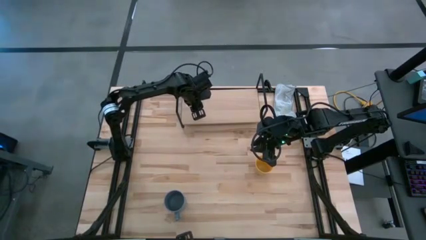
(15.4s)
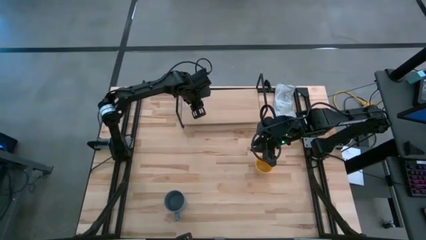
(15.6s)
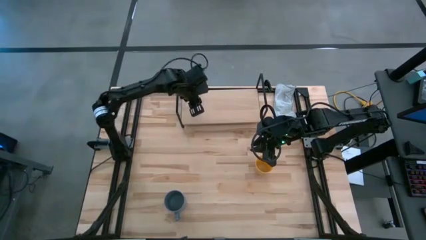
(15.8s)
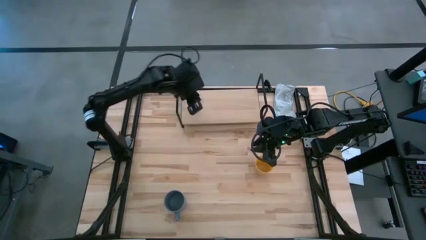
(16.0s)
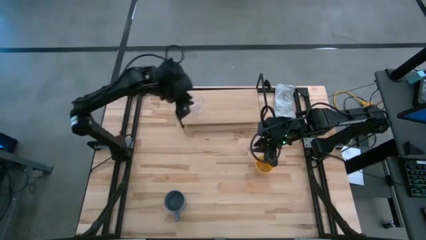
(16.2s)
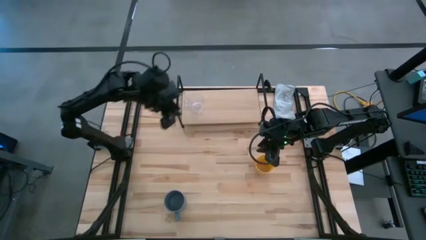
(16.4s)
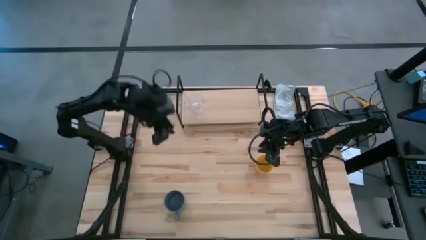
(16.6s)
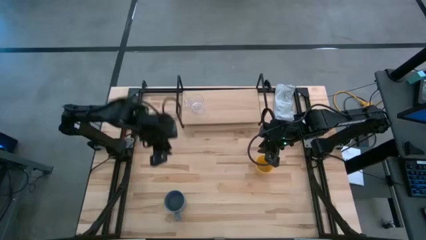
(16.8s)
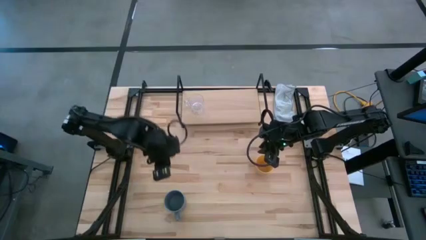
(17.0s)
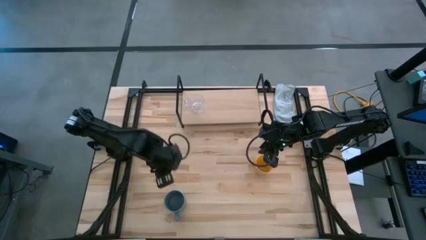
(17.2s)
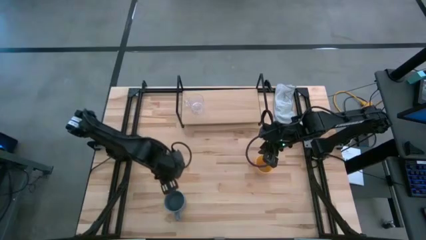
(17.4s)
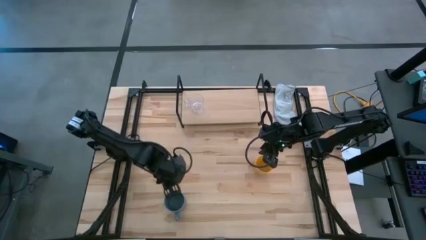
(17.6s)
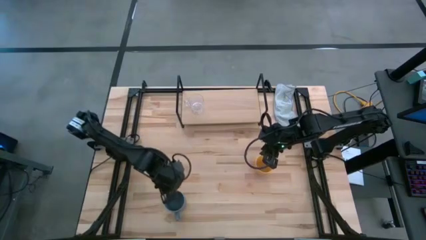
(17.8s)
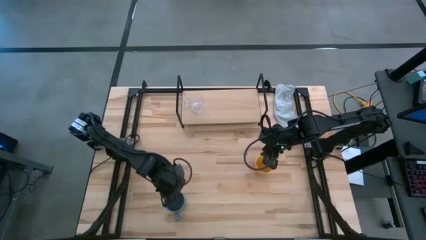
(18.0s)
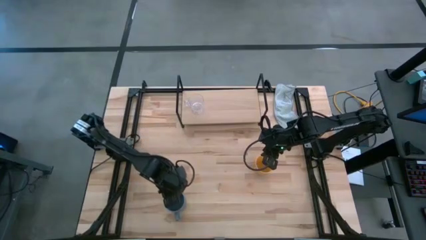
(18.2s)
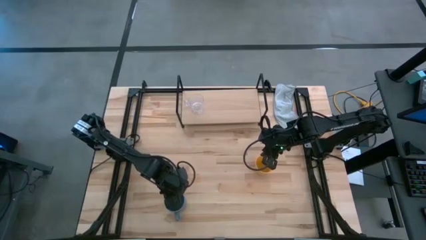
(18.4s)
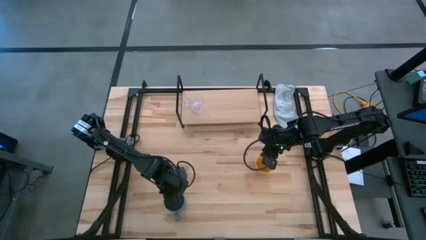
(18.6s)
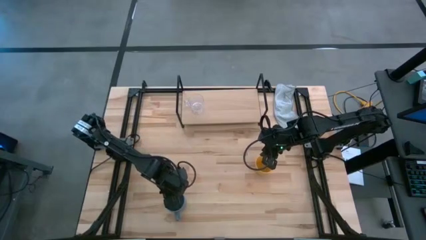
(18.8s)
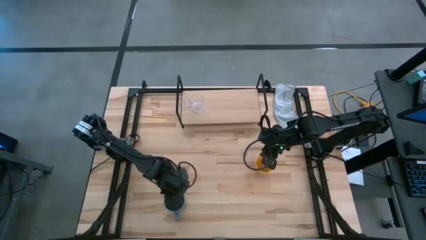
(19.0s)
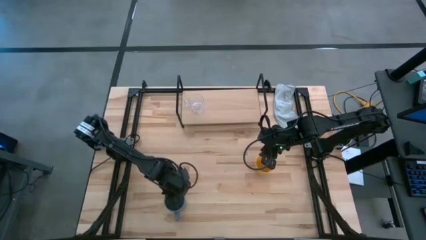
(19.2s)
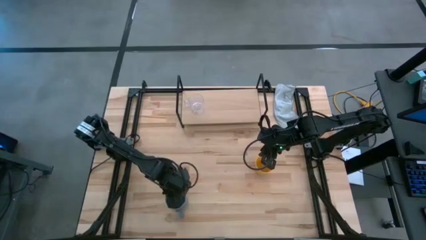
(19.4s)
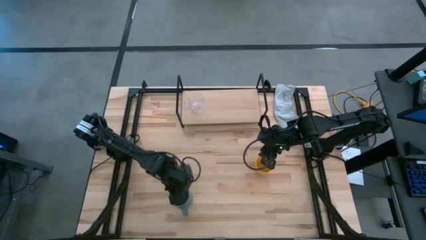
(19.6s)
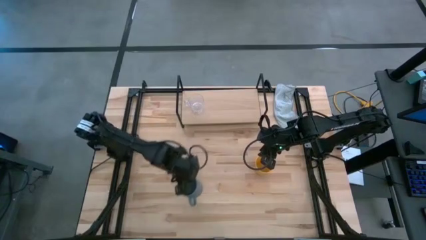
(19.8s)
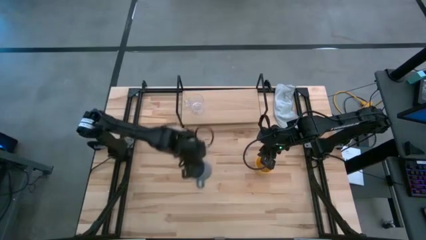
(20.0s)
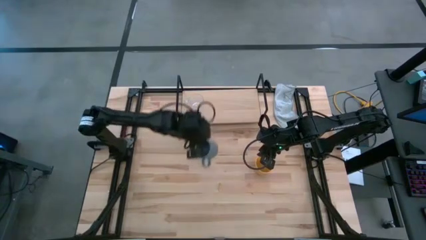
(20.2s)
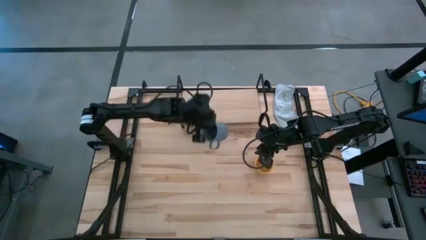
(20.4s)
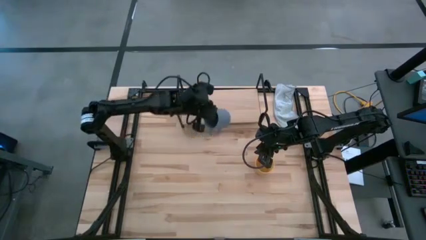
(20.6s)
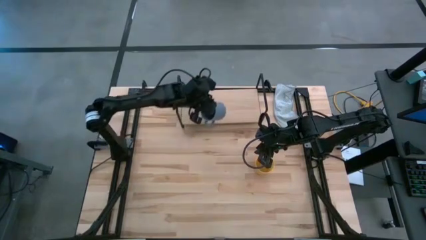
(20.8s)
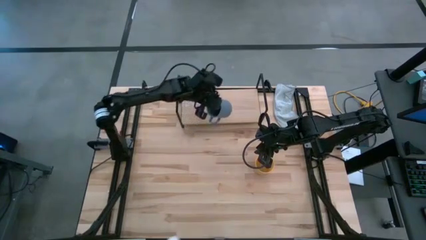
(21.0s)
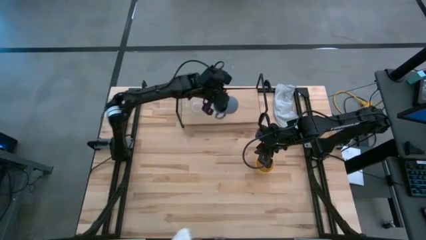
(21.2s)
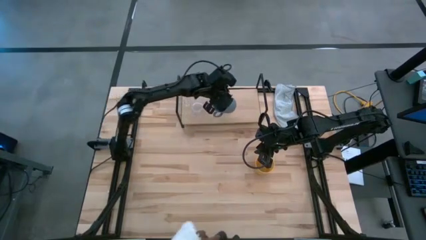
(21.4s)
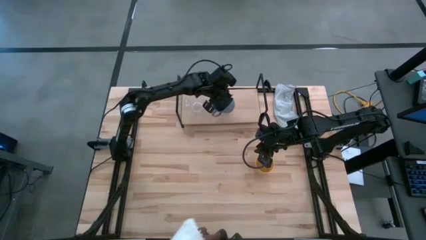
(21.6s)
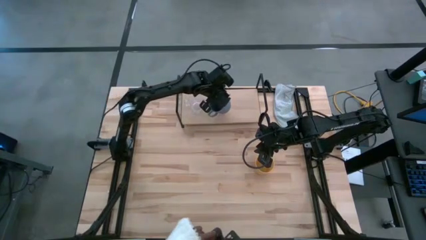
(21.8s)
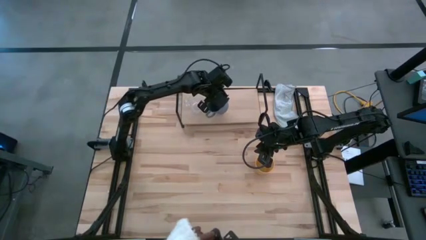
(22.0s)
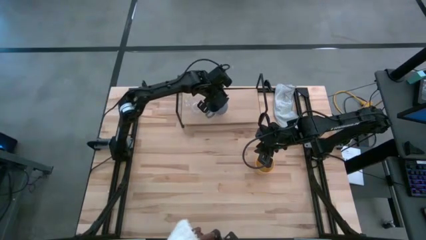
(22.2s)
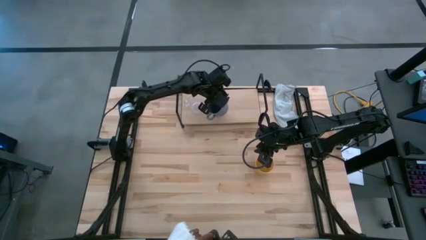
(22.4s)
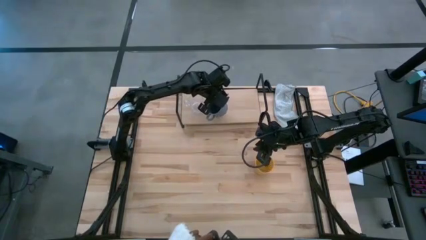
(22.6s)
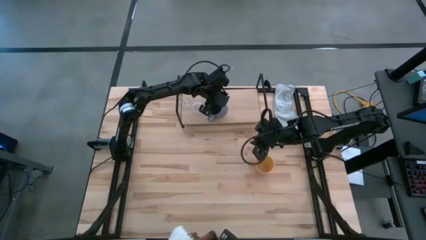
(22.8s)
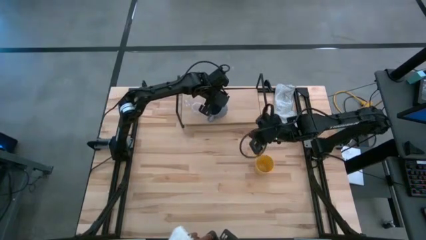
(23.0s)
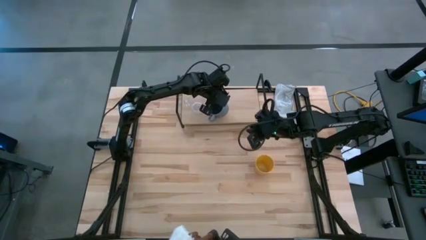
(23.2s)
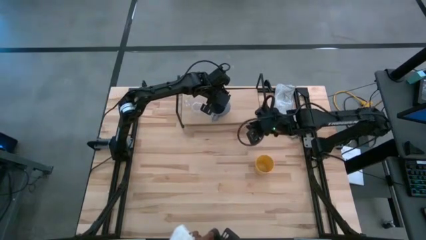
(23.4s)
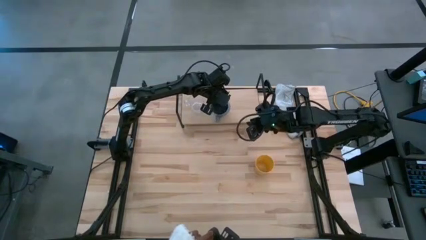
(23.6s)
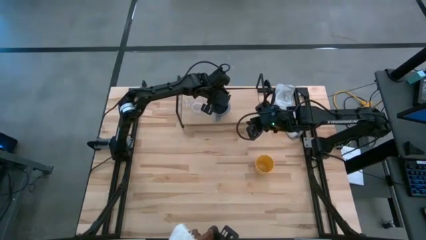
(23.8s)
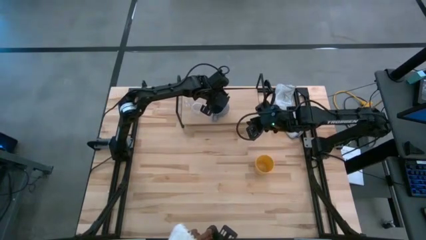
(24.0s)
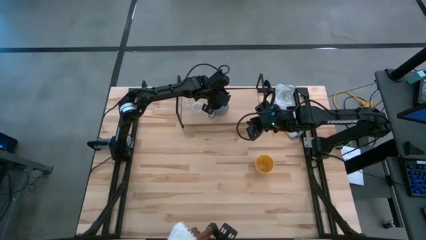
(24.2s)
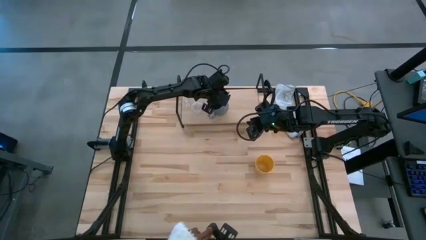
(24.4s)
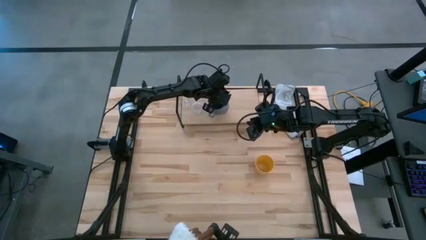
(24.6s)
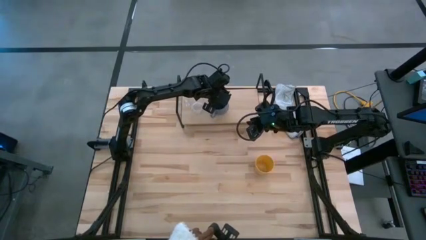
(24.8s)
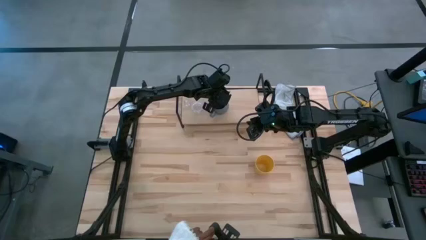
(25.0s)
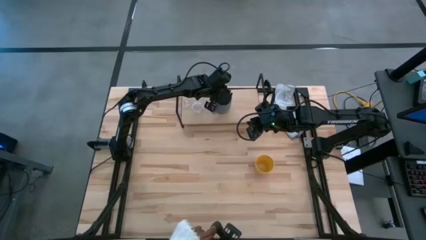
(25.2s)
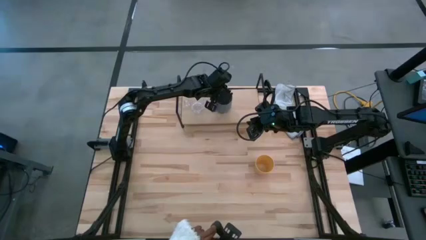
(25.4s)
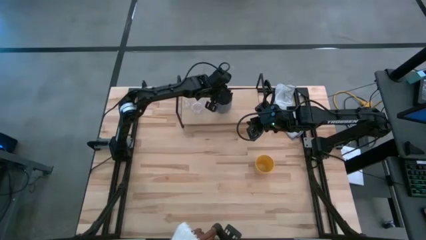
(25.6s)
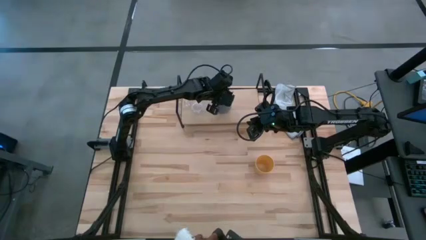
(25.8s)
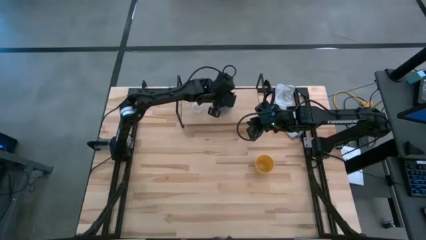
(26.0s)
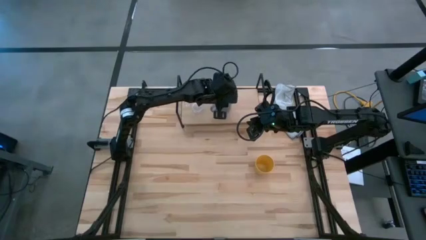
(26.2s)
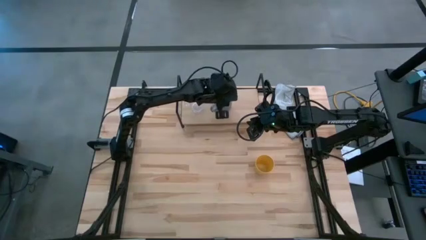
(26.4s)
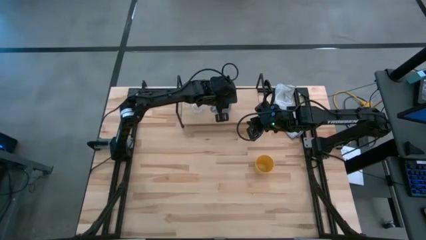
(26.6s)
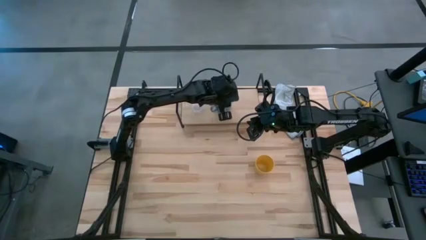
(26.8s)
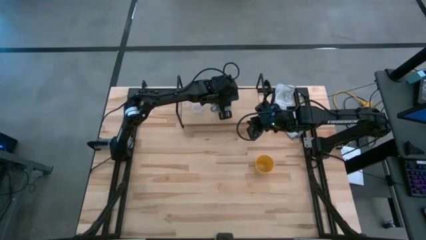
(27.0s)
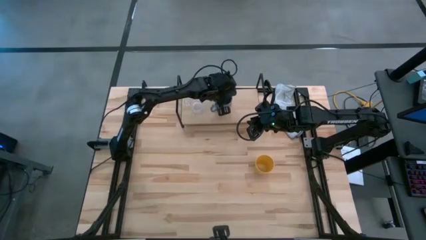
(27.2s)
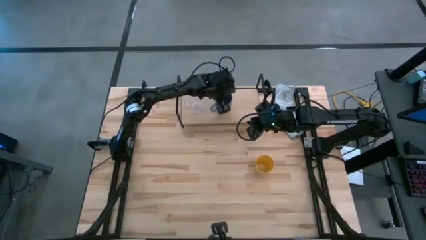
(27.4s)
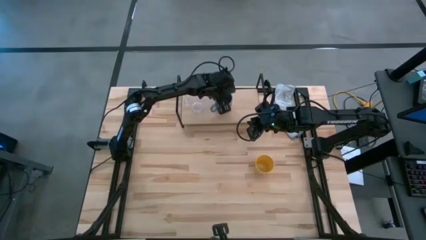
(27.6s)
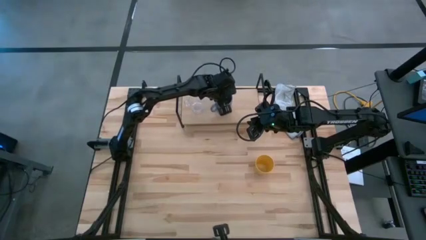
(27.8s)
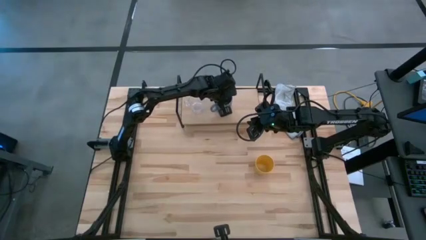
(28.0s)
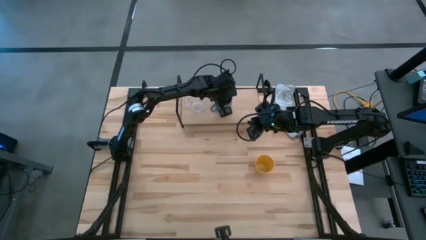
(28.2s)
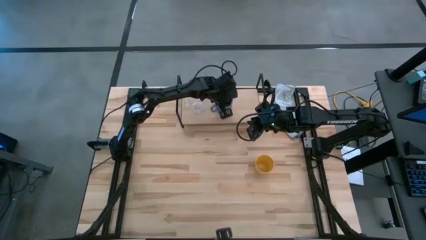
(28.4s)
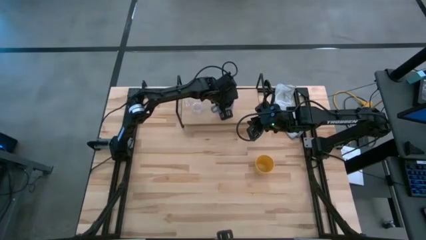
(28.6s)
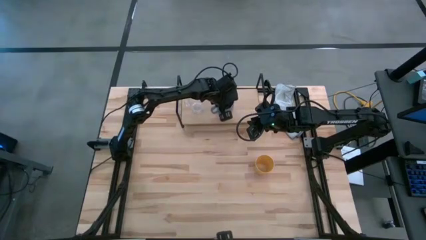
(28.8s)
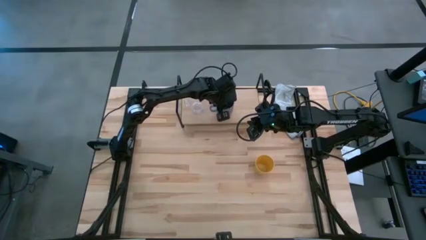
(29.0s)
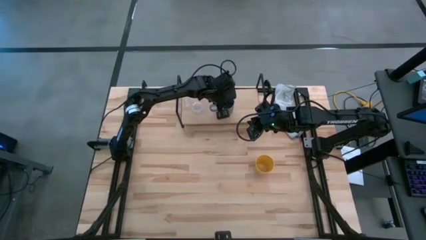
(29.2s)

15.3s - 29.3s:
Task: Stack small to large cups/mugs on shelf
Put the gray mug on the shelf

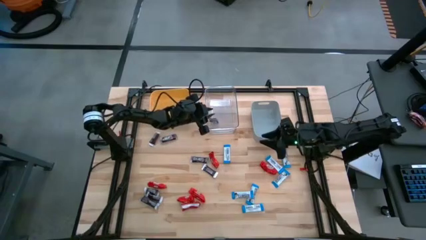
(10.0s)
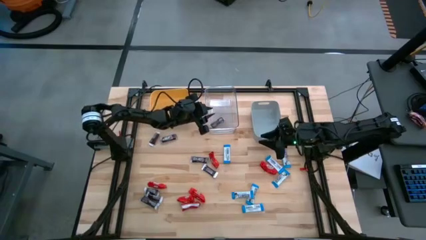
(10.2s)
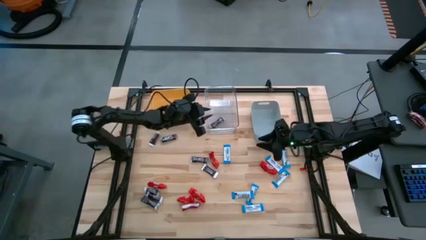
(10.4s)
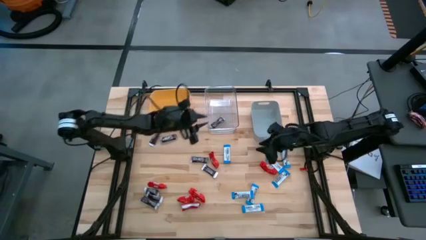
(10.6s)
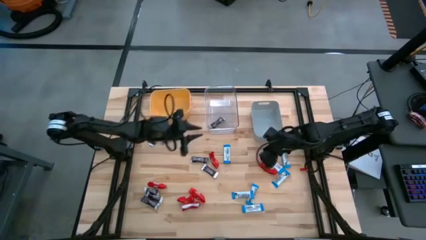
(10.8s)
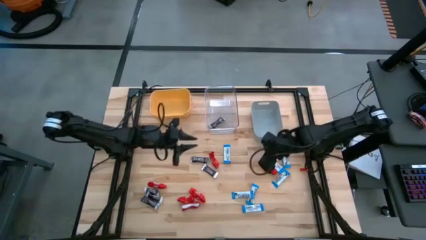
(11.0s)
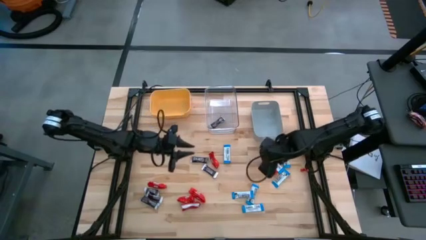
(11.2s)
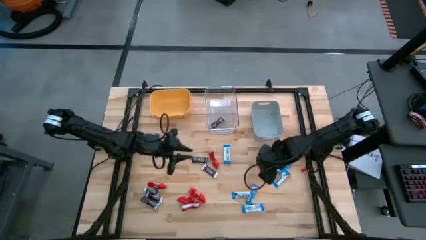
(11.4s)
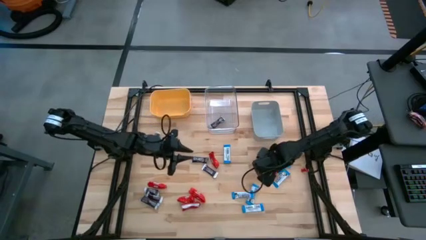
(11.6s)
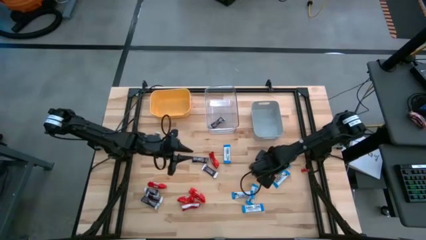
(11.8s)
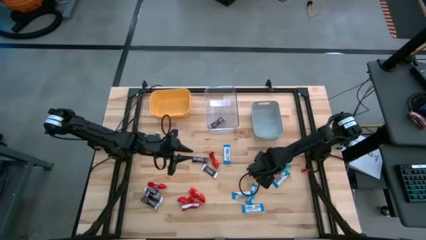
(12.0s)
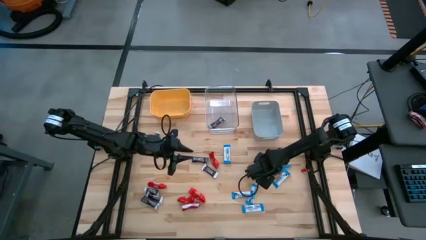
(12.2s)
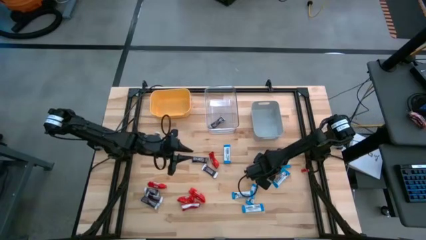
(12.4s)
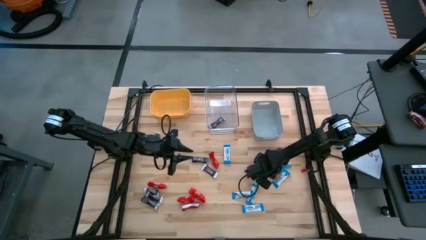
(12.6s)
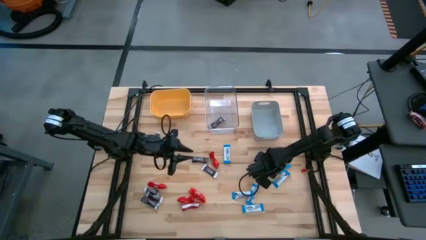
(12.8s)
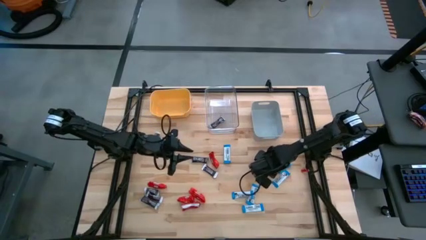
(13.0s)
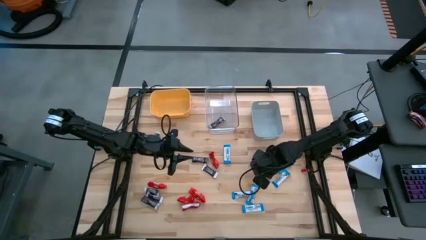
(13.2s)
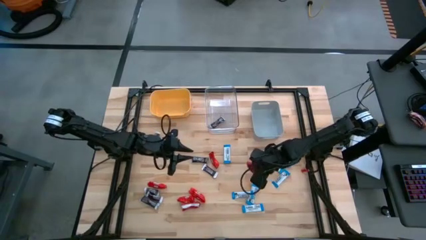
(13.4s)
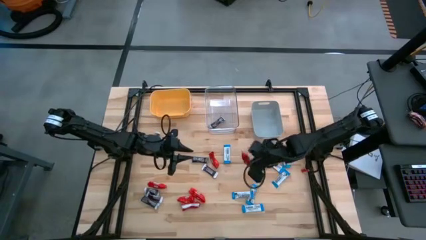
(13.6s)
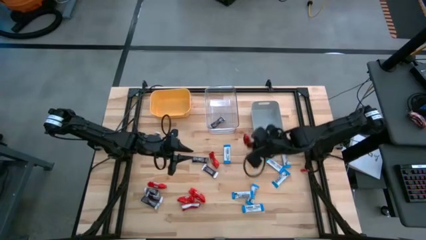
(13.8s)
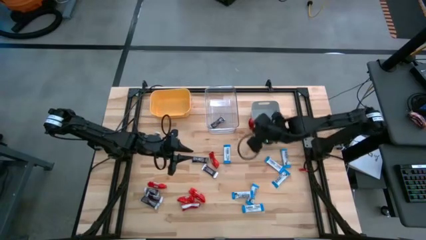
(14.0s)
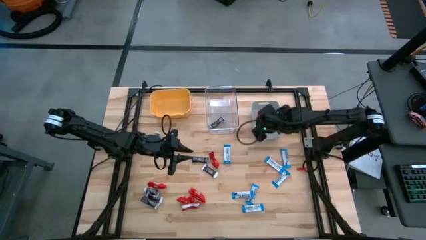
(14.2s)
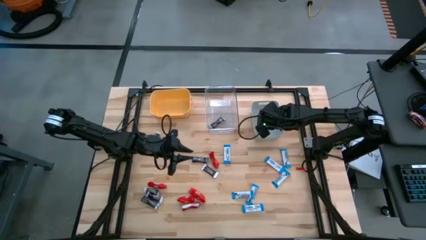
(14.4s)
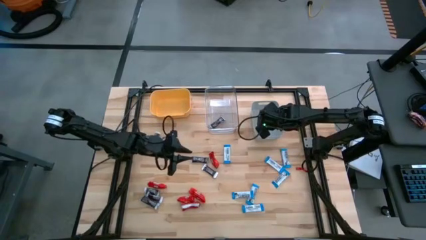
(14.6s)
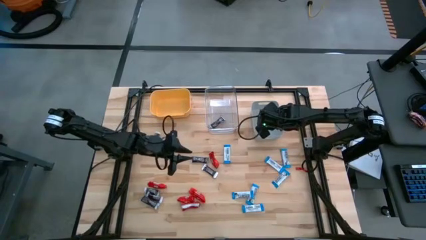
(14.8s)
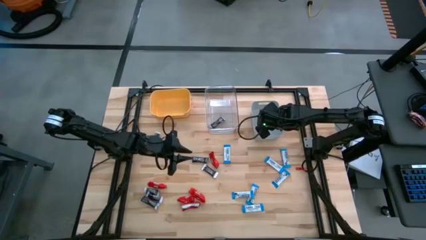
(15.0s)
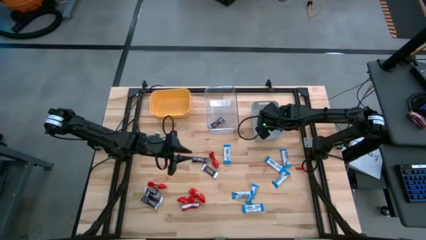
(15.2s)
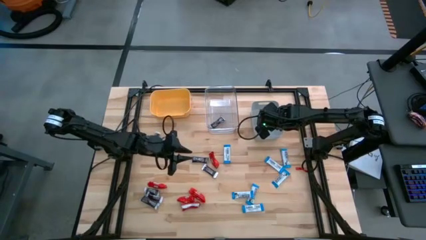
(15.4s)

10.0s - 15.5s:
Task: Sort candy
Put the red chocolate into the gray bin
